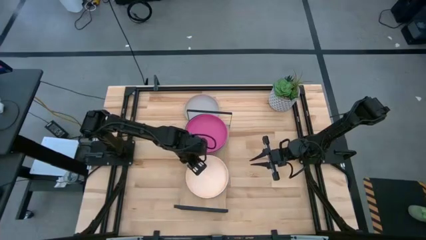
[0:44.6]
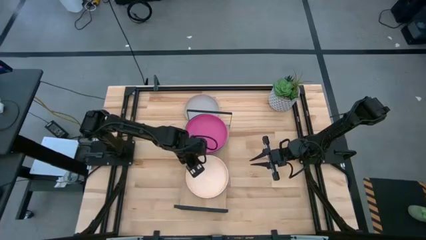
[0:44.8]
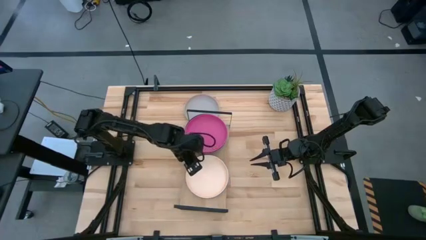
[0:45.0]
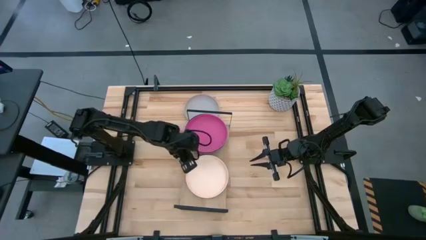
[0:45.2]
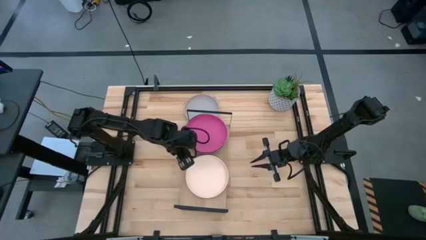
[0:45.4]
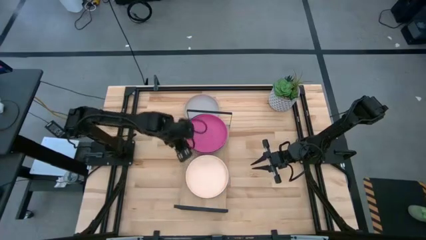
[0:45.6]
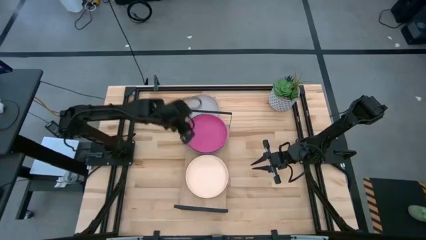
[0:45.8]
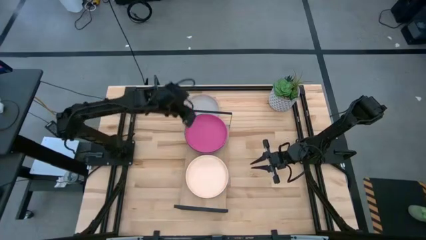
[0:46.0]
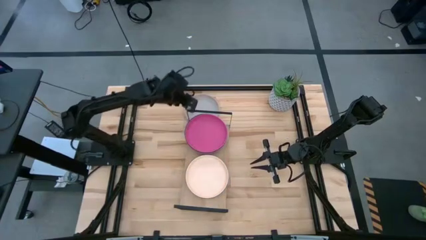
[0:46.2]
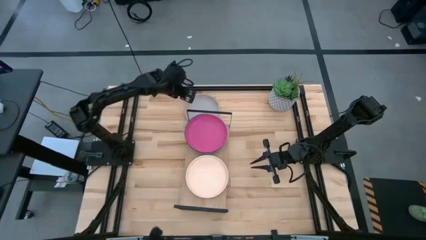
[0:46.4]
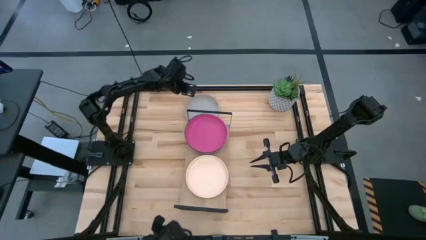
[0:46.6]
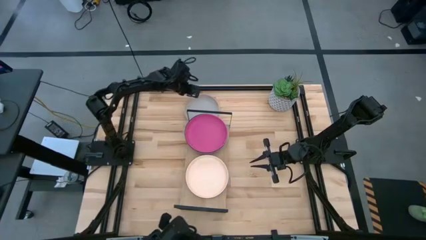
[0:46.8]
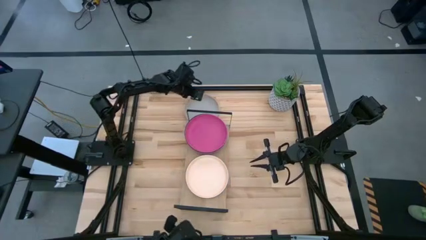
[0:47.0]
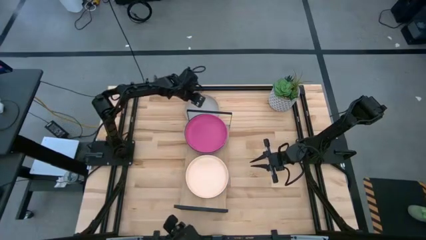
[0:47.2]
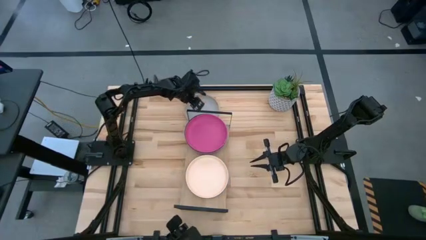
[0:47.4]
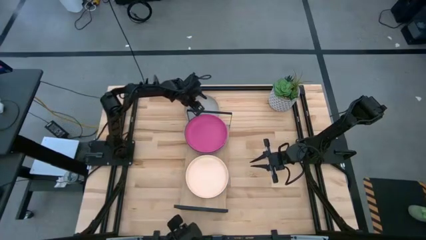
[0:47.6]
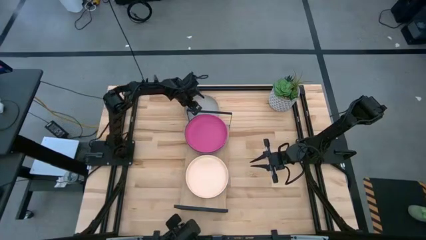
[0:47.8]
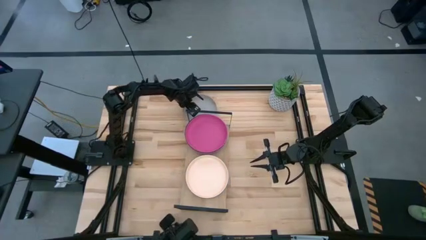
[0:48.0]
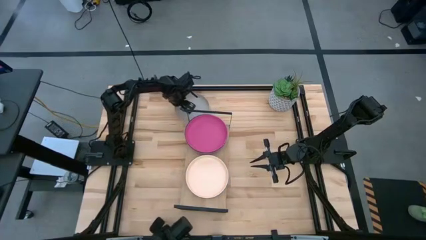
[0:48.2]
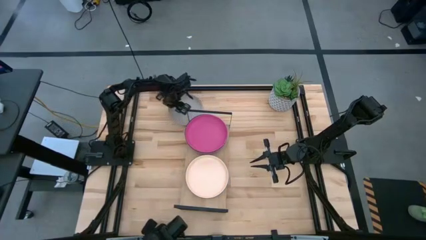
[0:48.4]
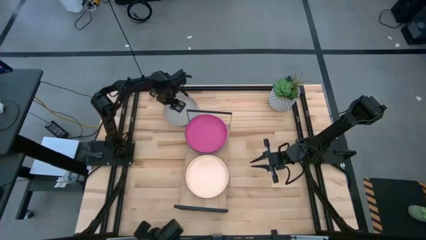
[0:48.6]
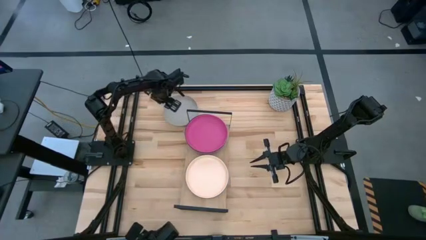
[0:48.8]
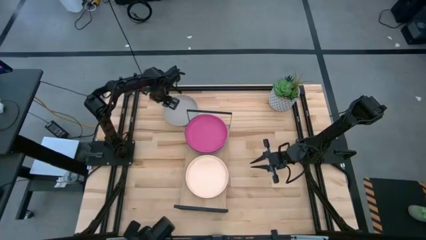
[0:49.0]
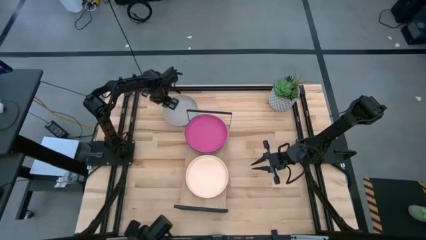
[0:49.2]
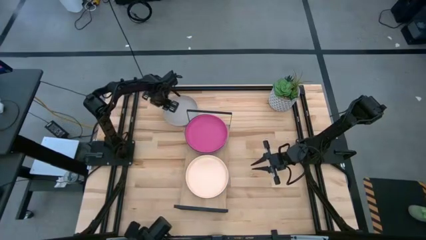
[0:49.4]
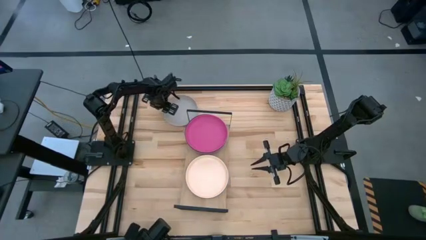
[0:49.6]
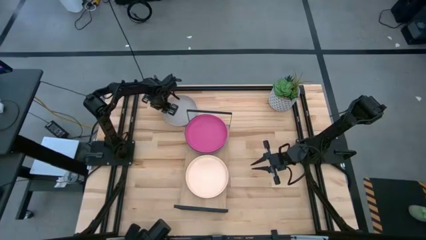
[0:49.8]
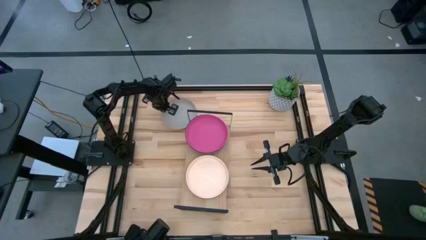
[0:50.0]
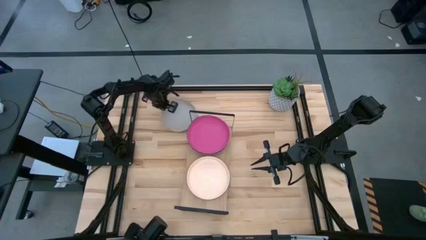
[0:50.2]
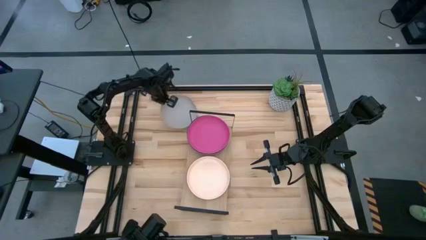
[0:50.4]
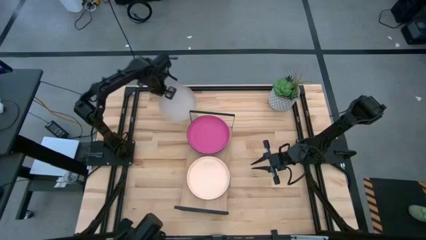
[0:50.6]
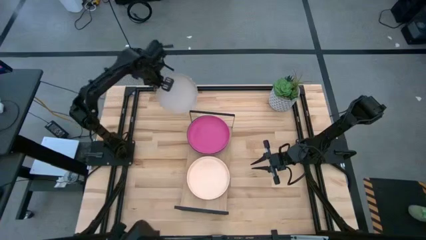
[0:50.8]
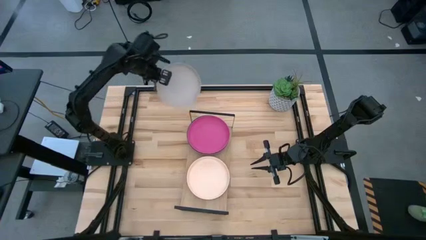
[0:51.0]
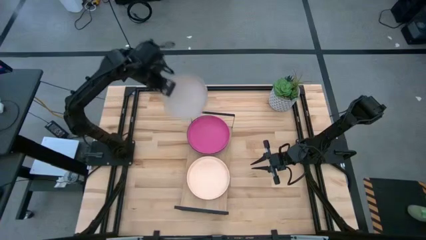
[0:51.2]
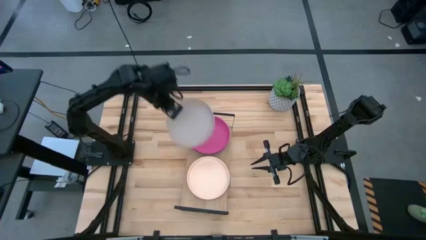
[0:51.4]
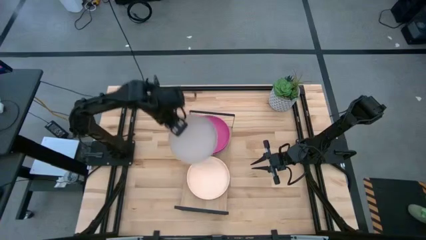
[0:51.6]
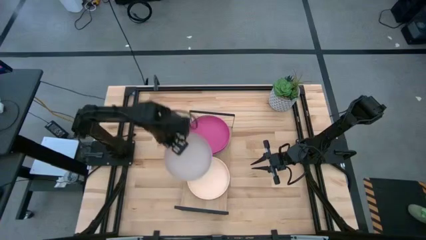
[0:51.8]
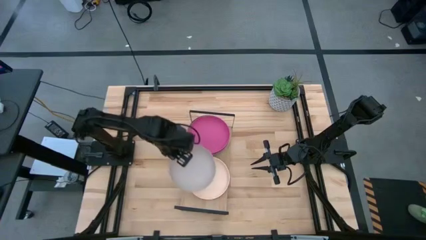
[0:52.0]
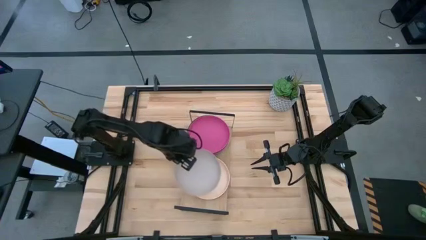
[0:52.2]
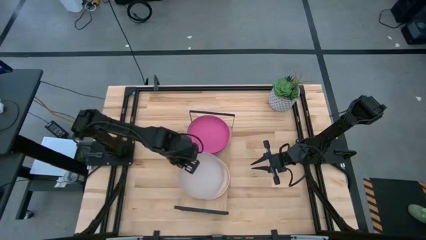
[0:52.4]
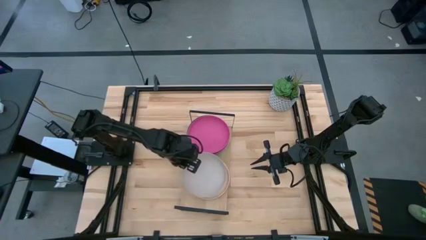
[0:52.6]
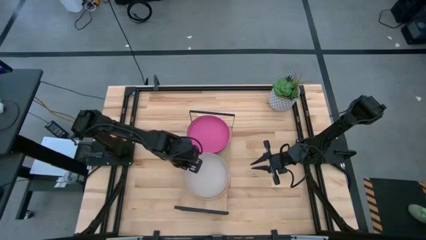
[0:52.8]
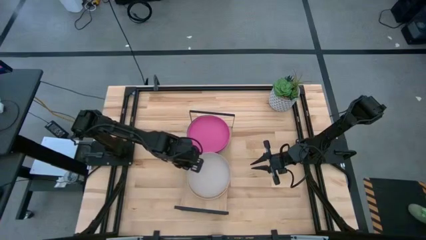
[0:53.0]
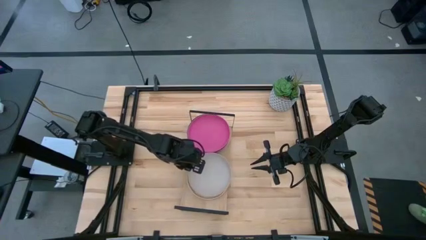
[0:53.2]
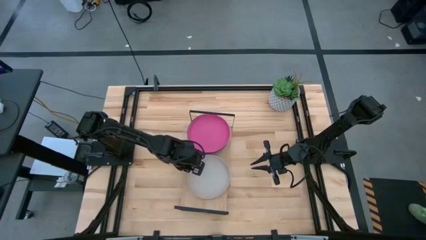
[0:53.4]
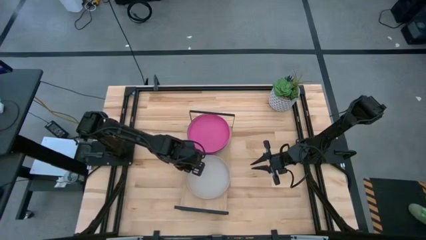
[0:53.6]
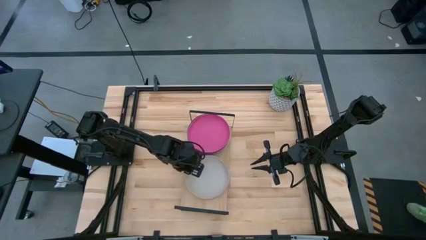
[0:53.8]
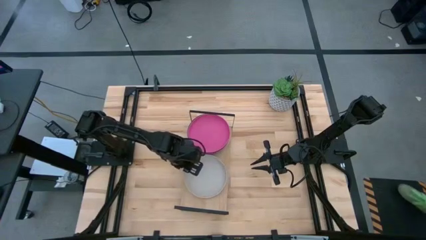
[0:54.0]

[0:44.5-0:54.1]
Task: Place and stack plates onto a shelf
Stack the gray plate on top of the light orange plate

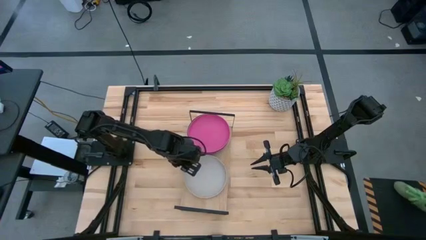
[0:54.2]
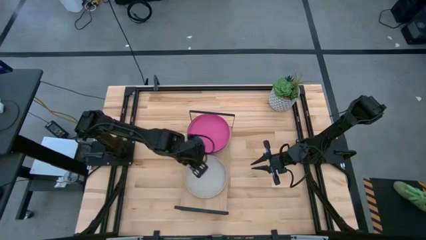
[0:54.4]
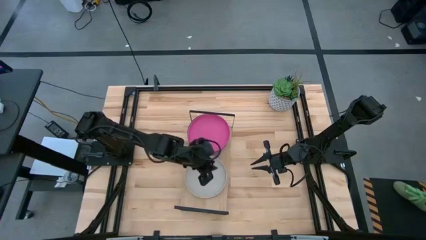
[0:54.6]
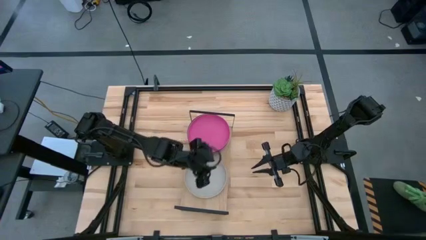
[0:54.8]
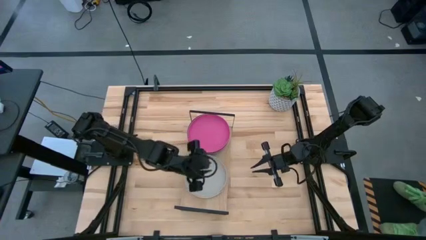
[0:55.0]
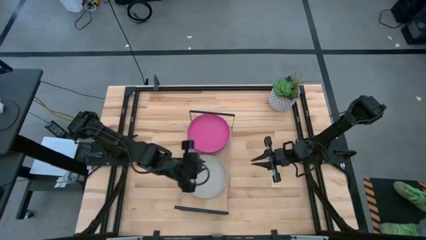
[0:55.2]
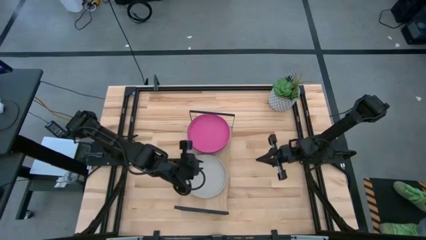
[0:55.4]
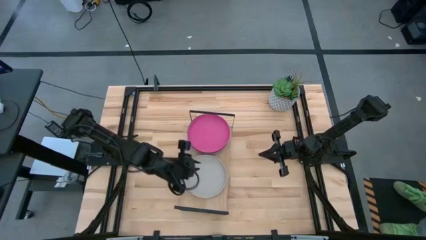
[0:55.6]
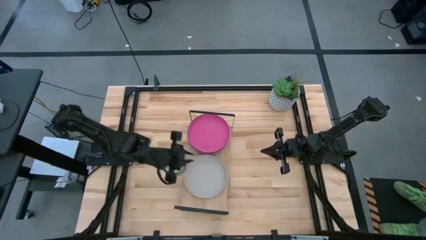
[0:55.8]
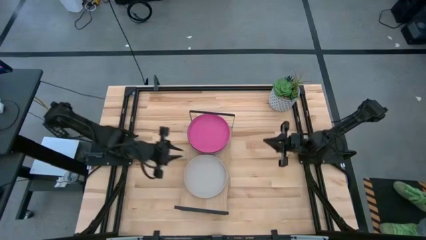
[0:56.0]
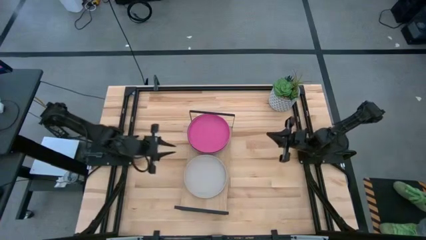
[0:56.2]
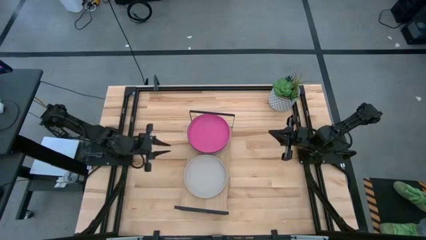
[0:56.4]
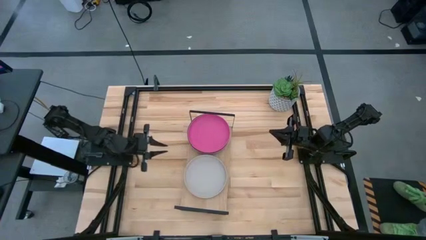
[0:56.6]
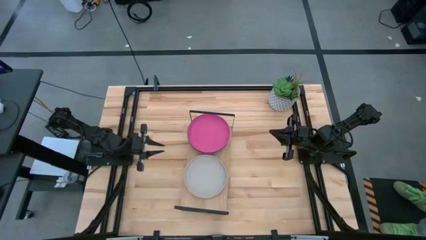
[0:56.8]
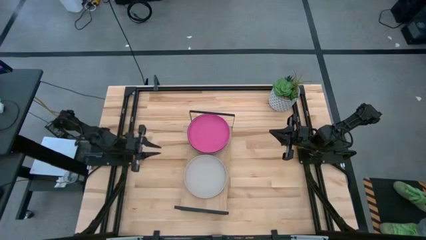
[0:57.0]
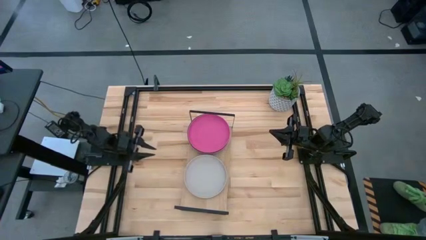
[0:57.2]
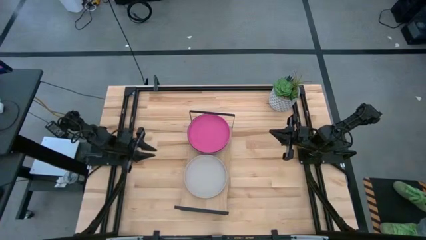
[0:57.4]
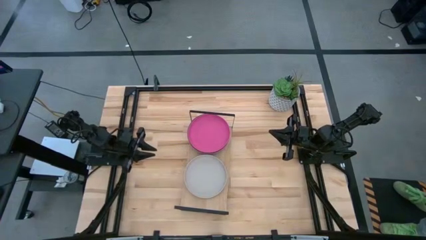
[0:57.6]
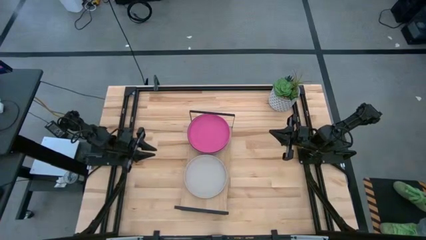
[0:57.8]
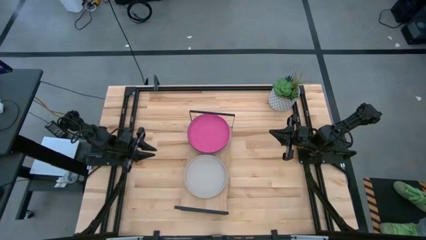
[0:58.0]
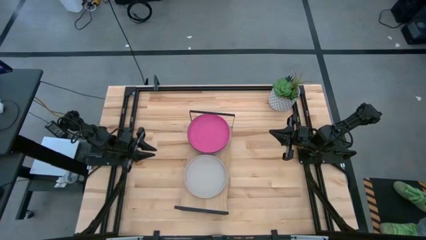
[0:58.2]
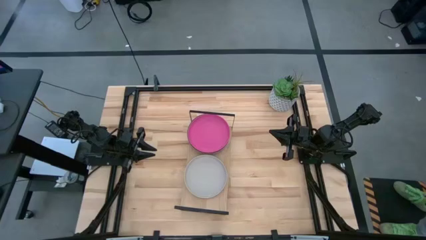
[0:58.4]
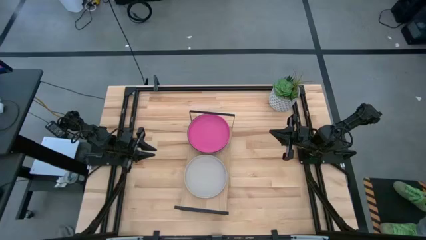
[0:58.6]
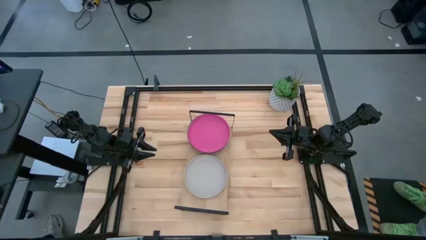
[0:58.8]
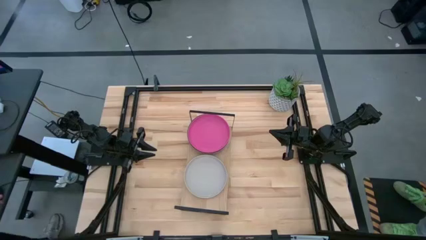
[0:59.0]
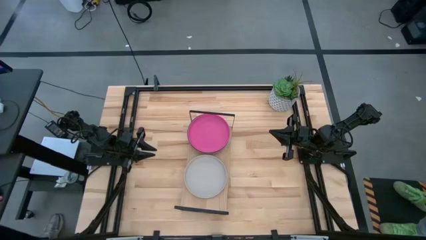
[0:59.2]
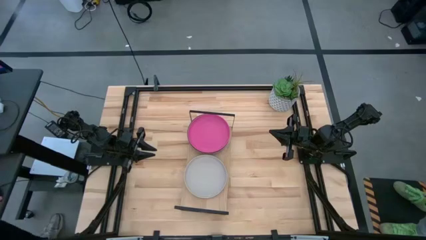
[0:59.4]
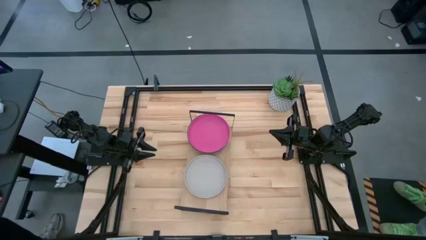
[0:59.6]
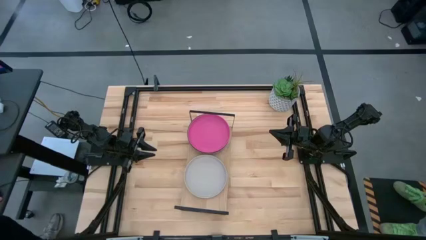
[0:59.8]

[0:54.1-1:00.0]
Return to Home Position

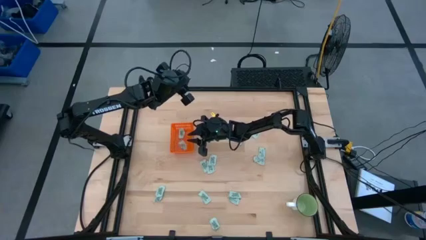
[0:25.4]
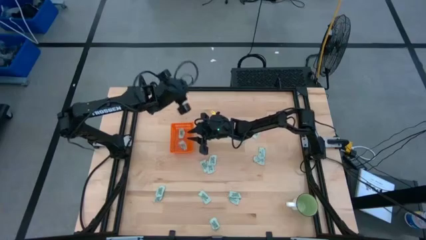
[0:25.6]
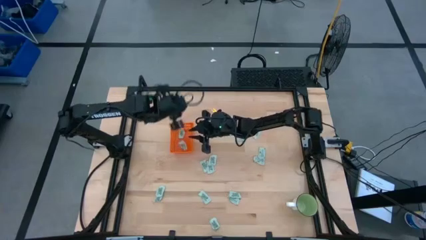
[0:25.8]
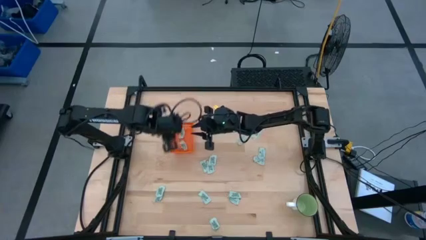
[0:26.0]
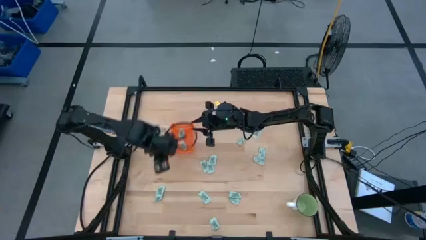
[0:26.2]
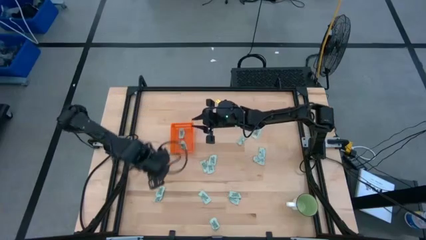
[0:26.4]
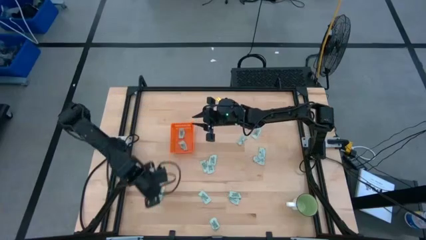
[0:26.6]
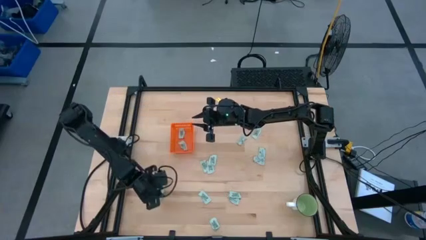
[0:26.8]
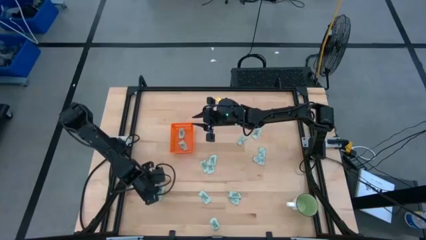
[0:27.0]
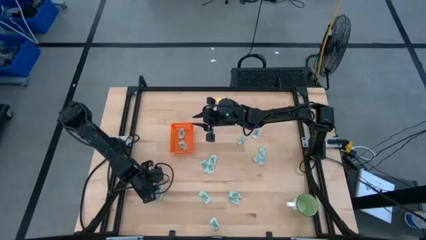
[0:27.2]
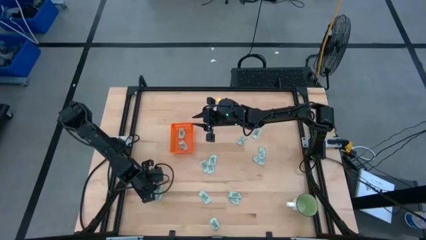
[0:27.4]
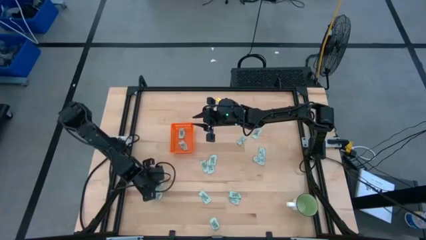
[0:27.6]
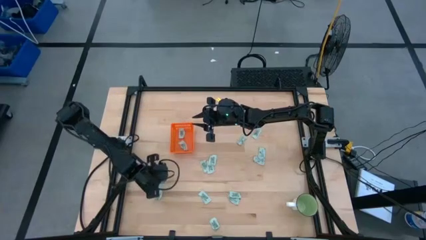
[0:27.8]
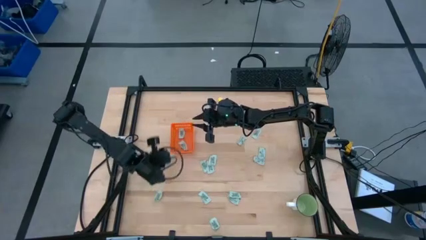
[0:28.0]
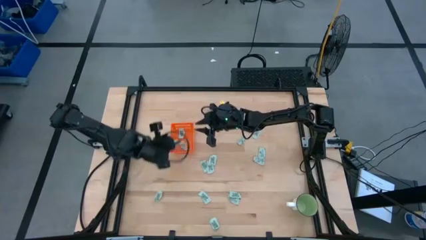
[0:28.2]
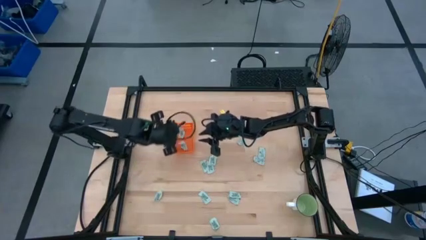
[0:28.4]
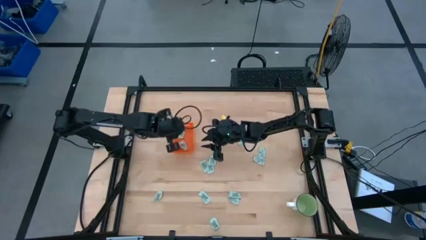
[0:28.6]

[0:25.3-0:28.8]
Task: Pick and place Stevia / Truvia into bins
Put the green stevia packet into the orange bin
